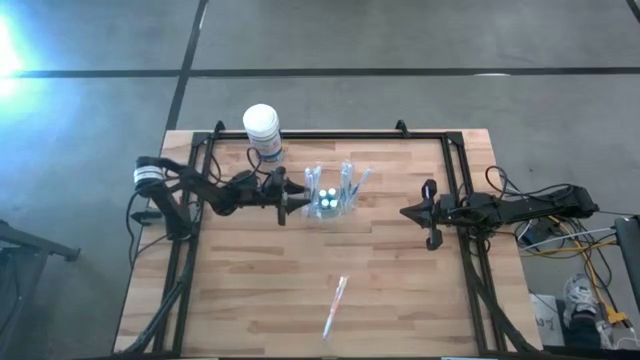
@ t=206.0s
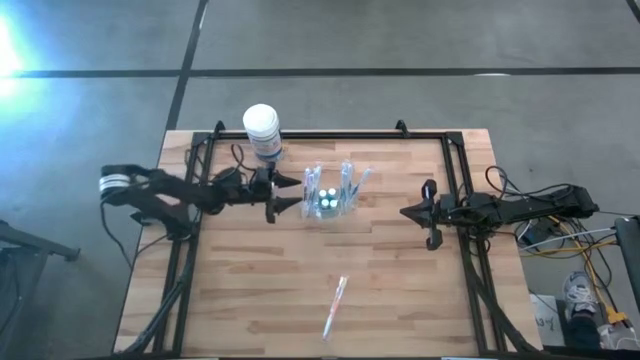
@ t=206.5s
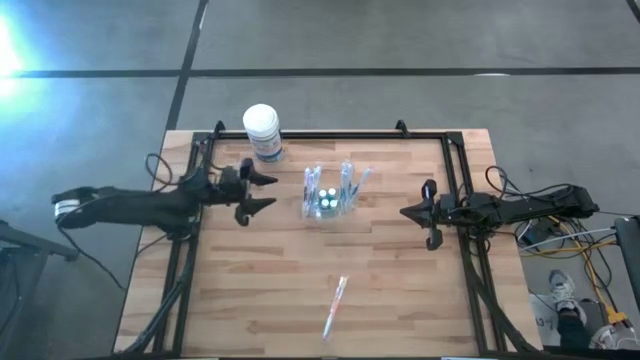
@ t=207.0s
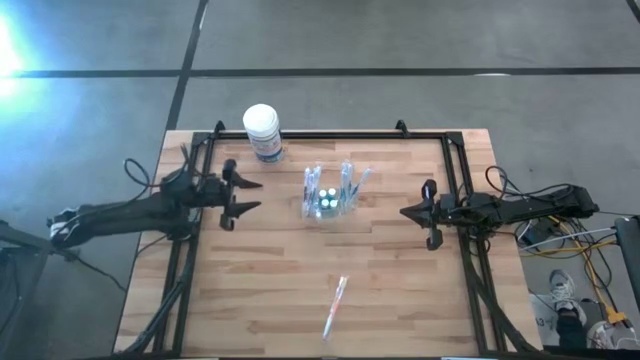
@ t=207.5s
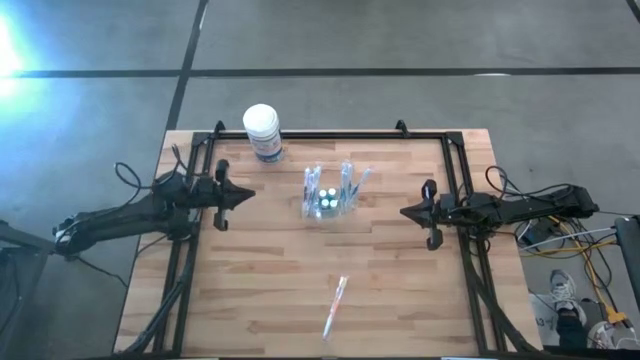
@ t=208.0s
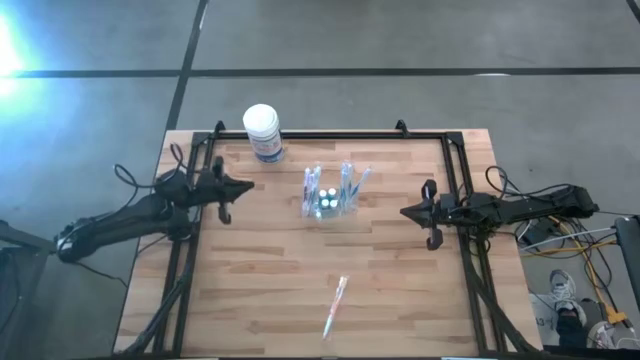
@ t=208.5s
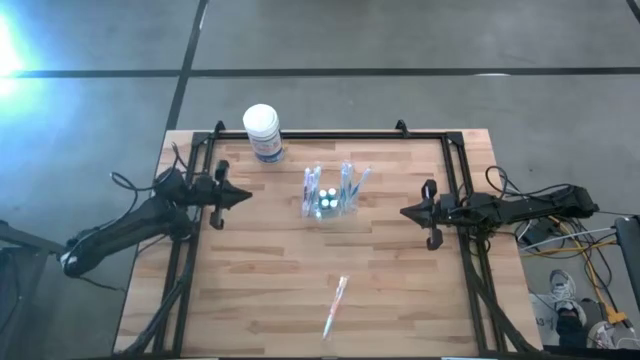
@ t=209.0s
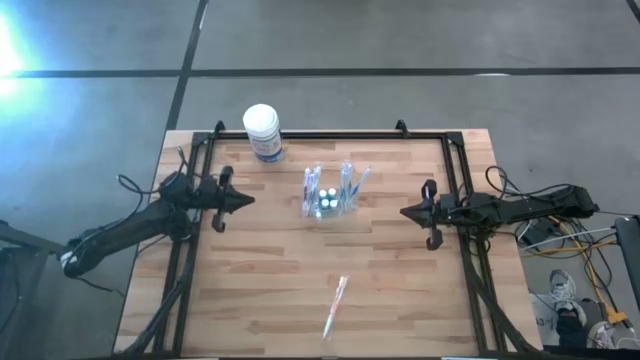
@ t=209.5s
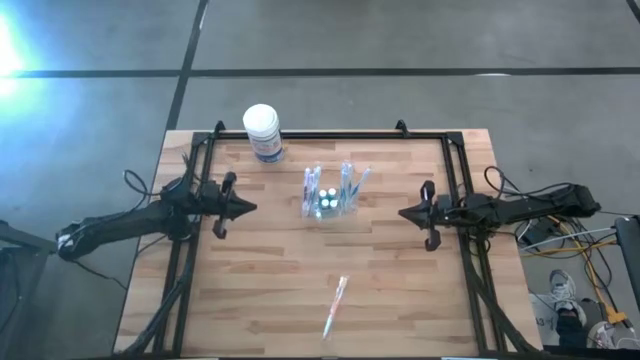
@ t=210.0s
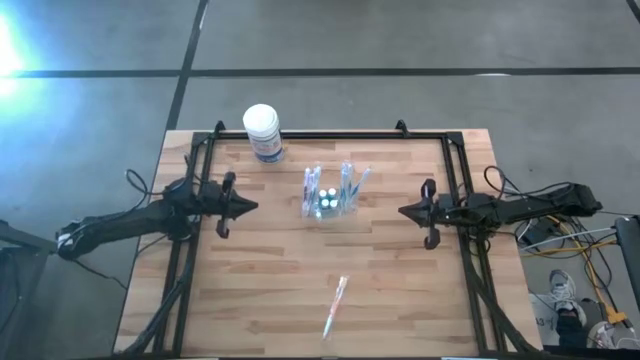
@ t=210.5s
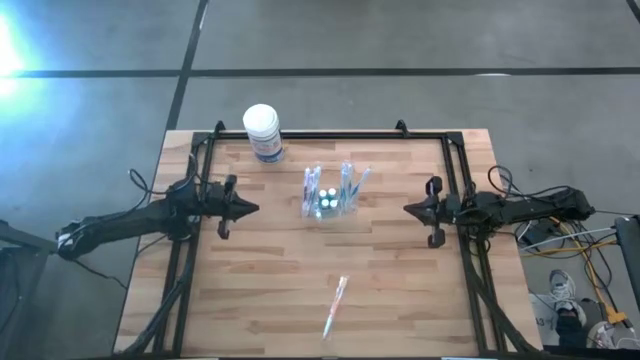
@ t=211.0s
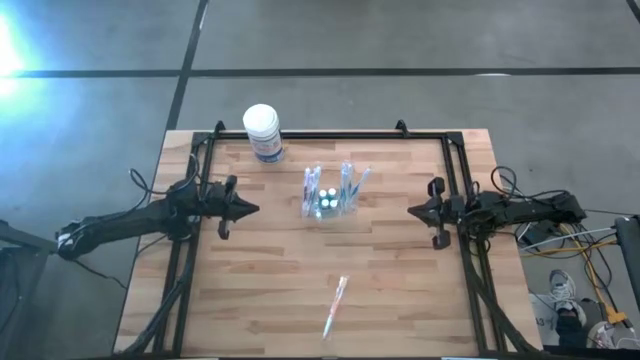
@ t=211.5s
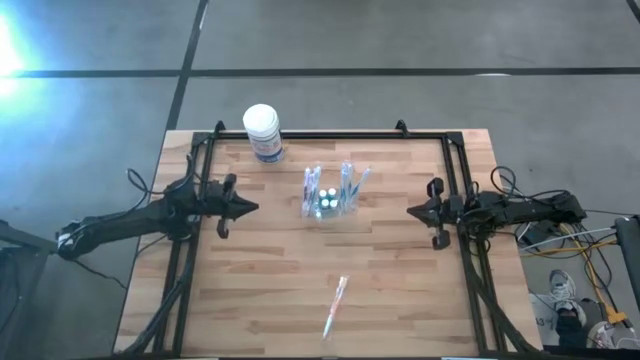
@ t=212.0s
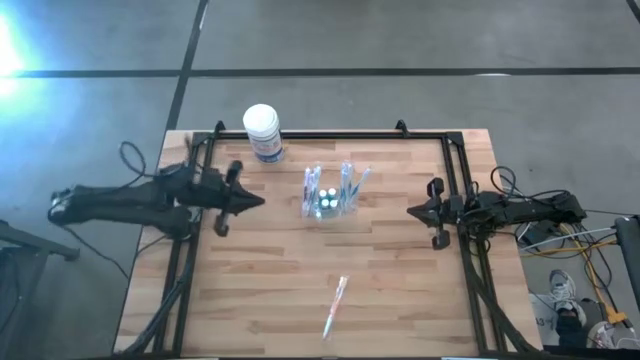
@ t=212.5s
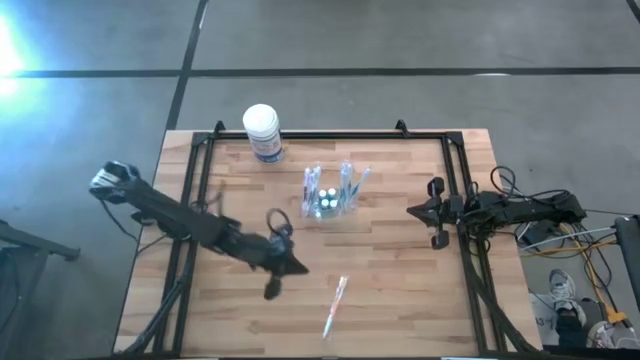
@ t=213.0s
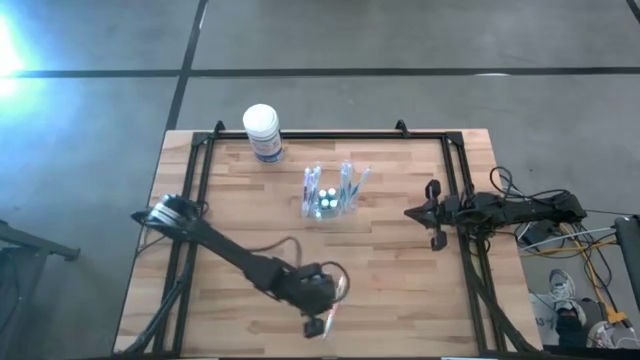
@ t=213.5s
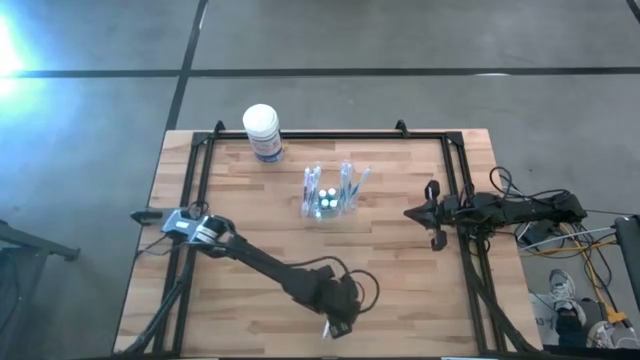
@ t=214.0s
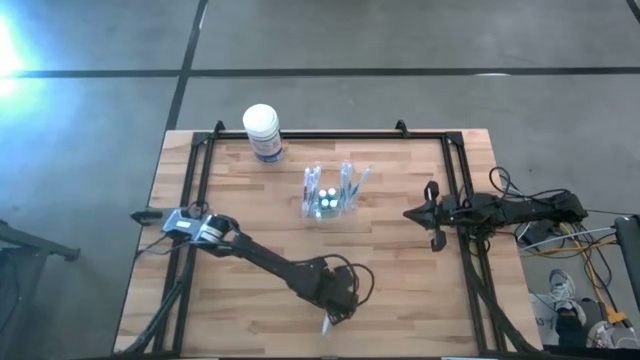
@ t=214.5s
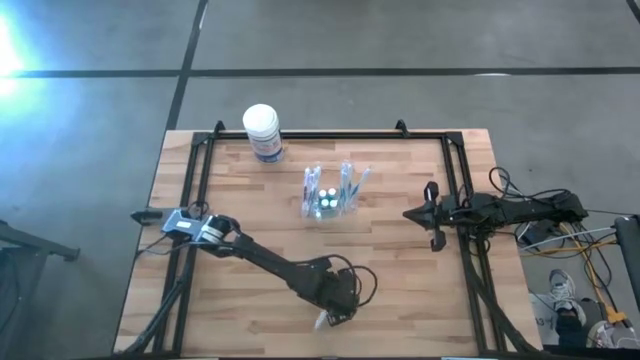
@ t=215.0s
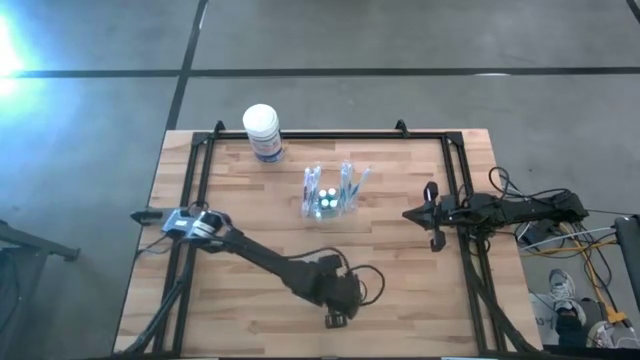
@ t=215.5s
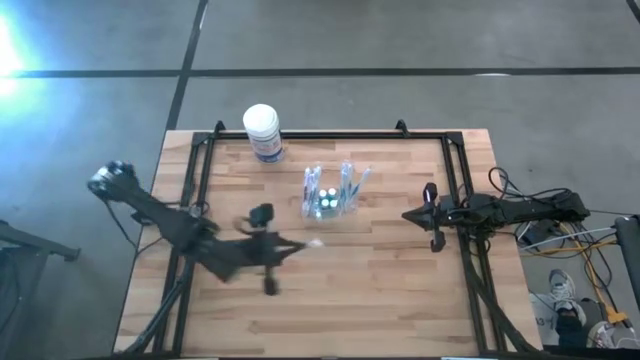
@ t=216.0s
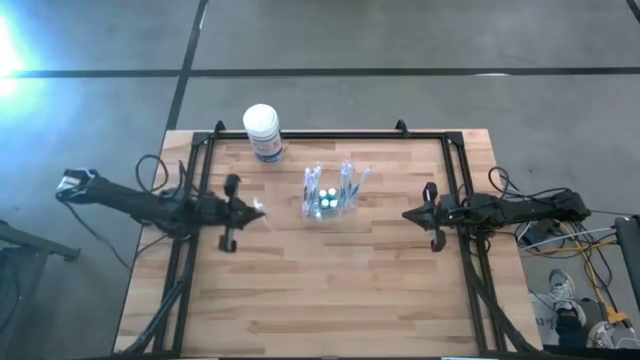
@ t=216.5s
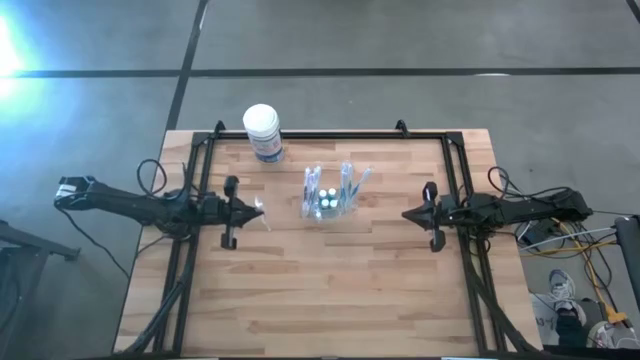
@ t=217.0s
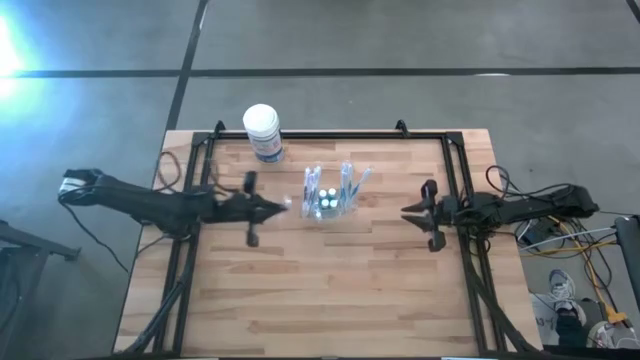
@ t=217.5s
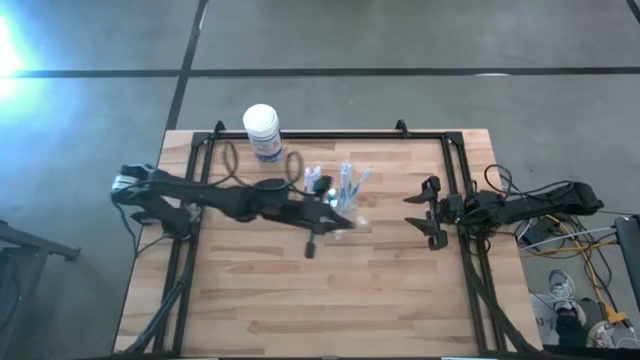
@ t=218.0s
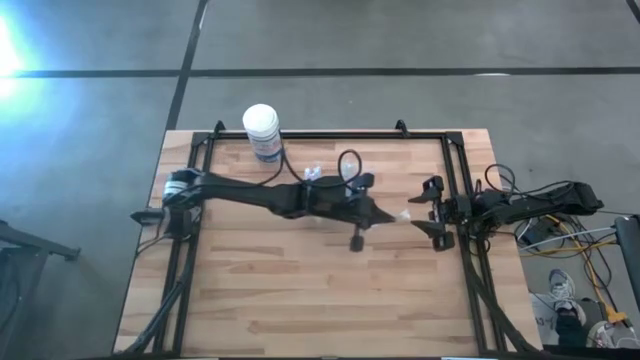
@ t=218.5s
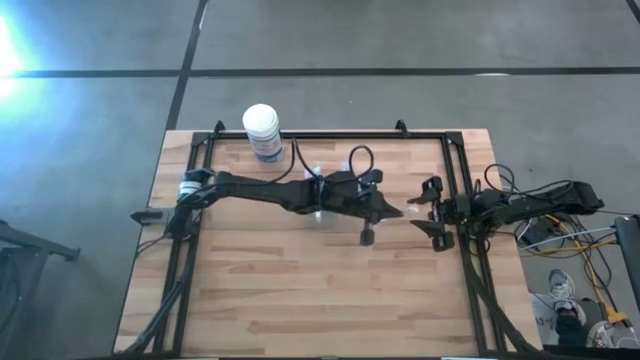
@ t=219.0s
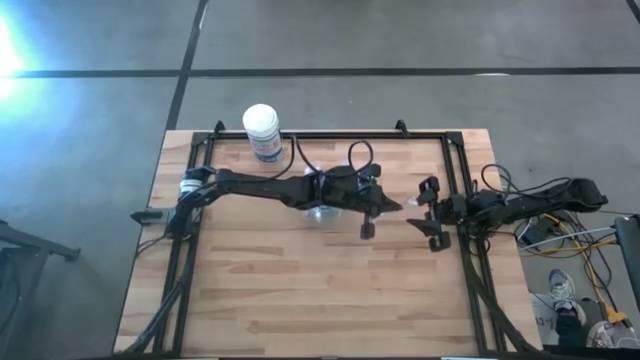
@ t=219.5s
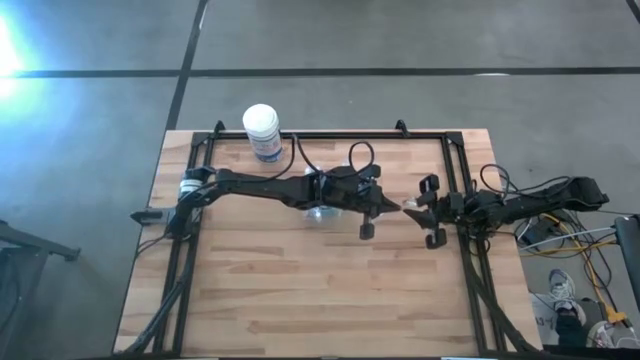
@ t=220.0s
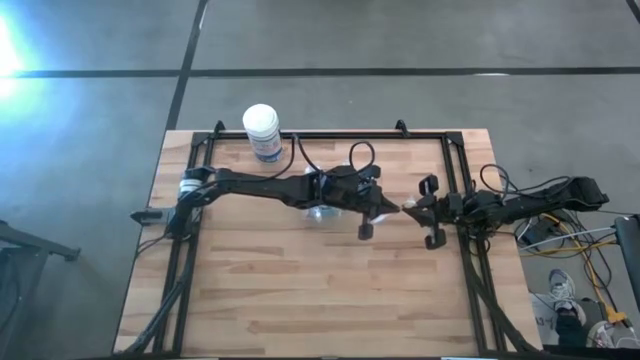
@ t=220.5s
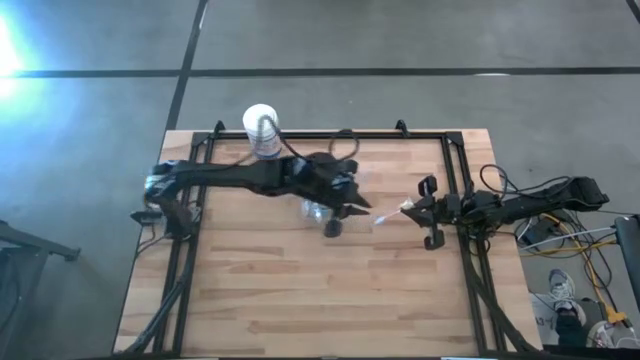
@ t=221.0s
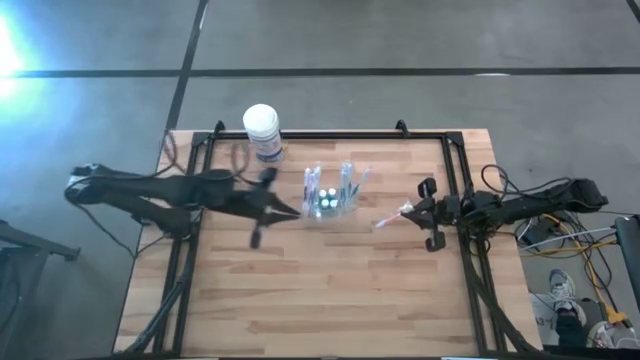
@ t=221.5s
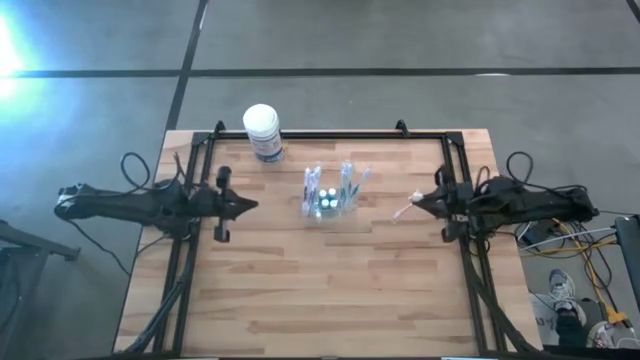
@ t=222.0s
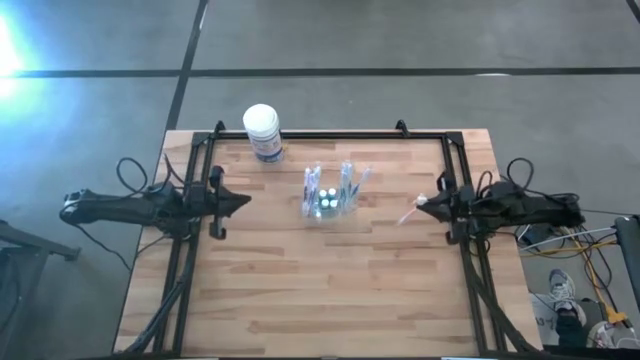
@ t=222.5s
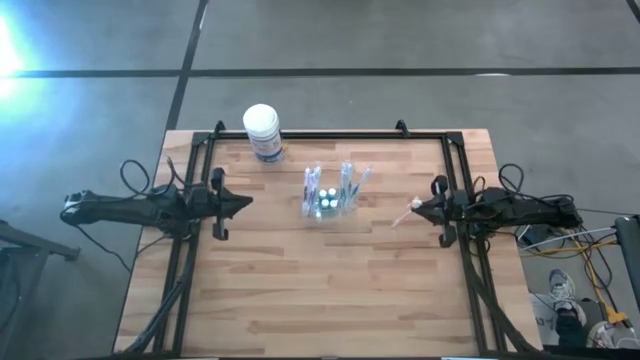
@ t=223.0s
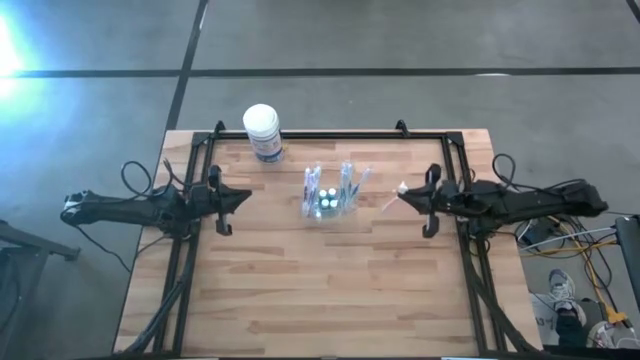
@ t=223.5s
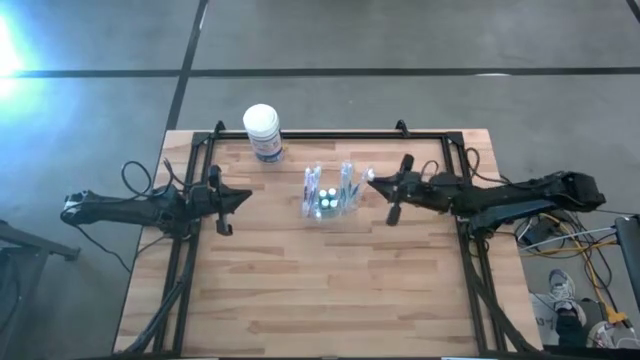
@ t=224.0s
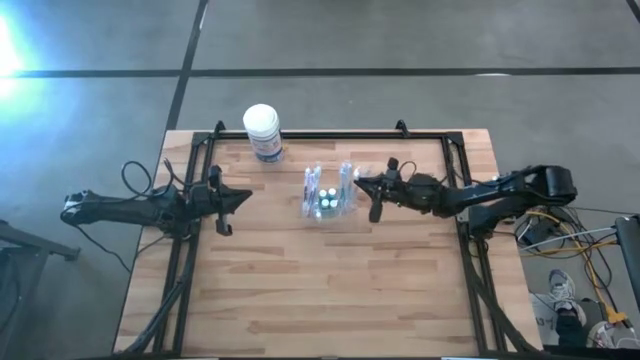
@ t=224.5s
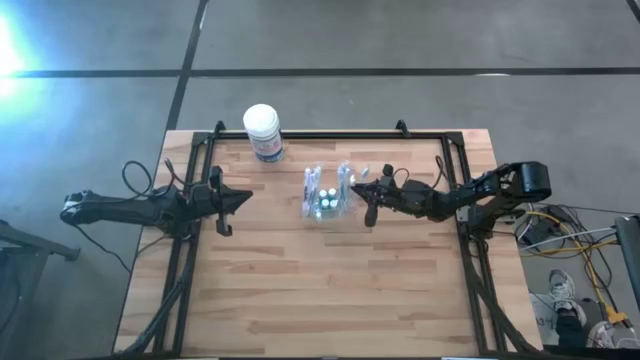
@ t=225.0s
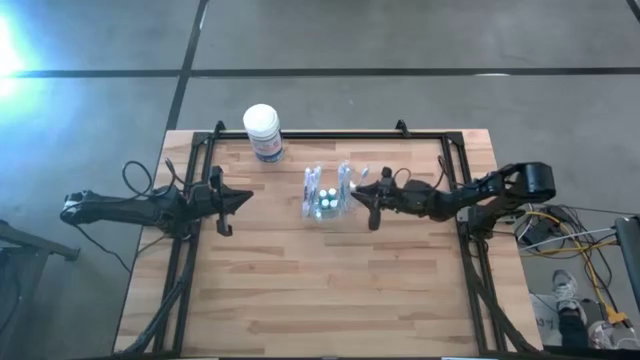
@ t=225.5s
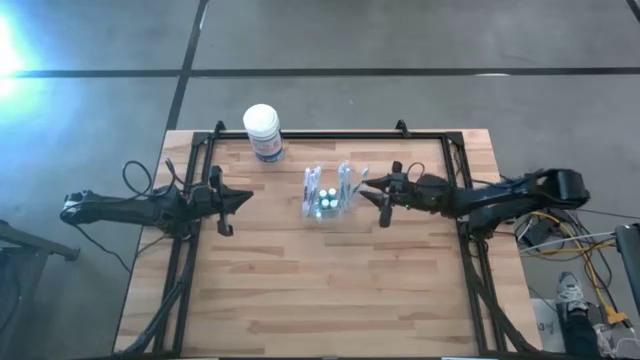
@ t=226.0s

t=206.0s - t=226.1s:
Task: Pick & Place toothbrushing station
Put the orange toothbrush into the transparent bin organizer
